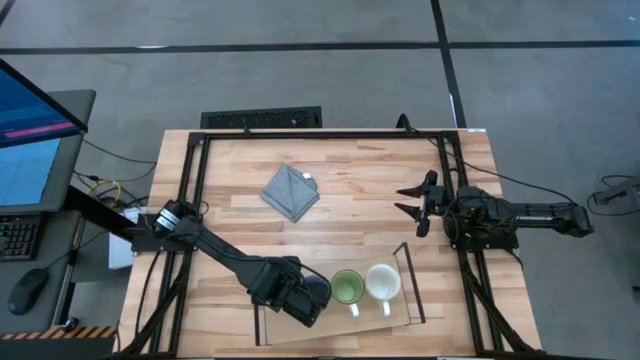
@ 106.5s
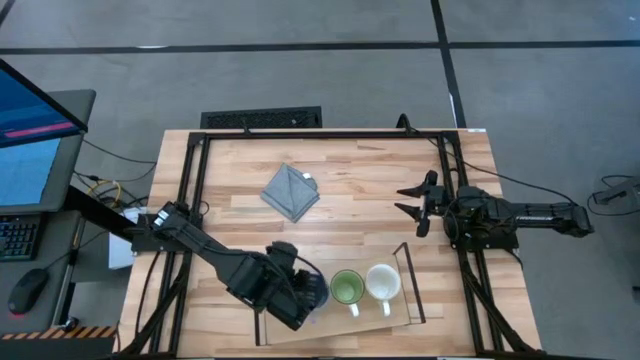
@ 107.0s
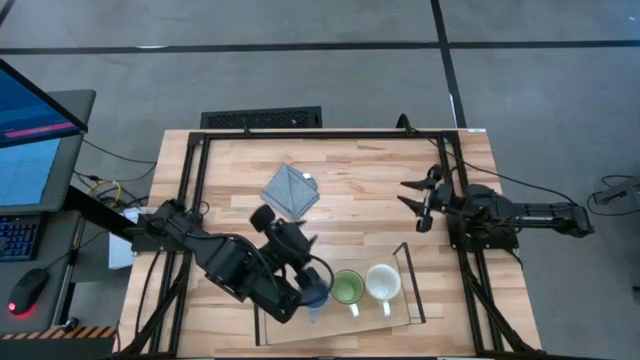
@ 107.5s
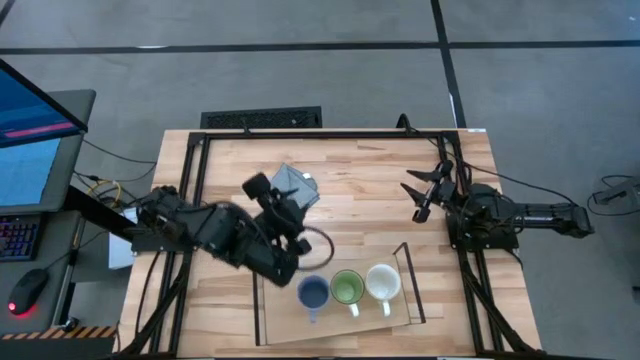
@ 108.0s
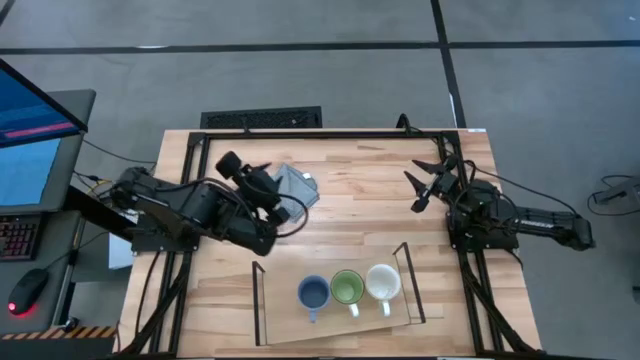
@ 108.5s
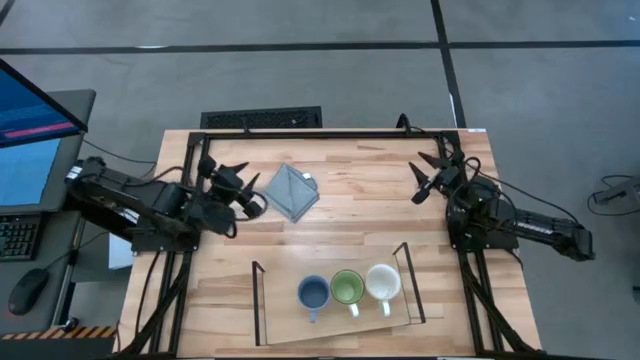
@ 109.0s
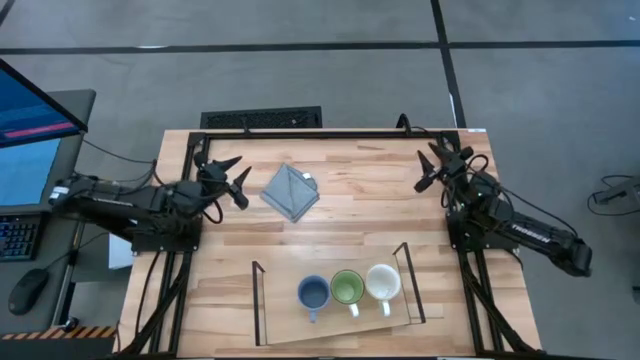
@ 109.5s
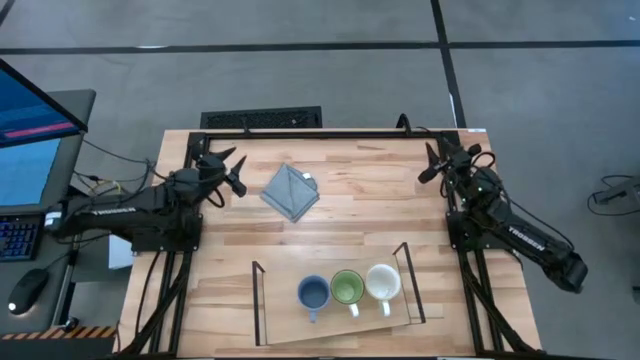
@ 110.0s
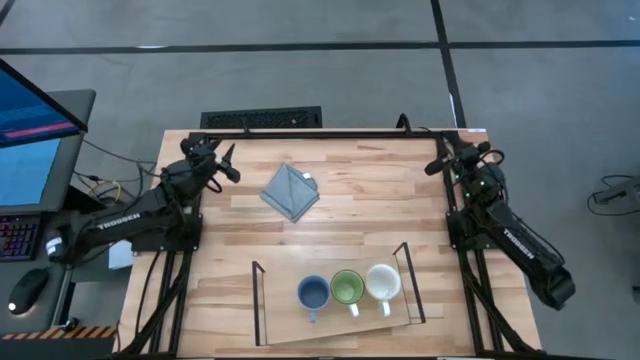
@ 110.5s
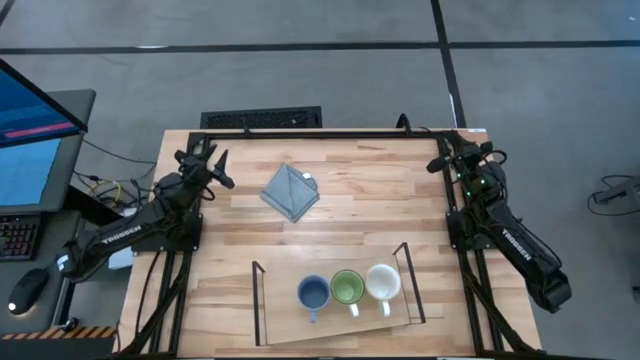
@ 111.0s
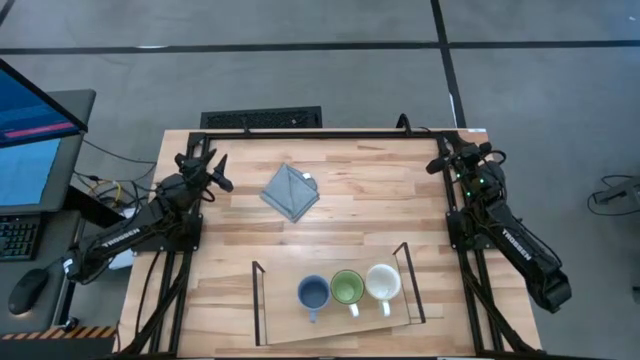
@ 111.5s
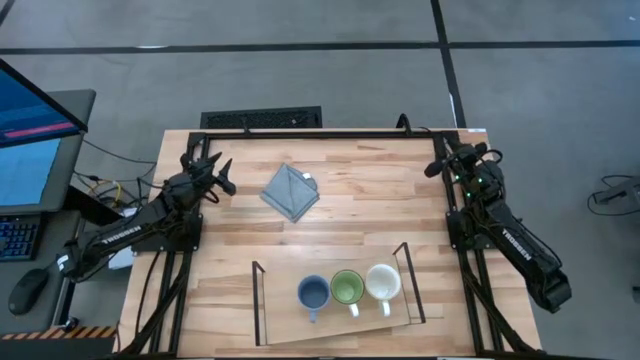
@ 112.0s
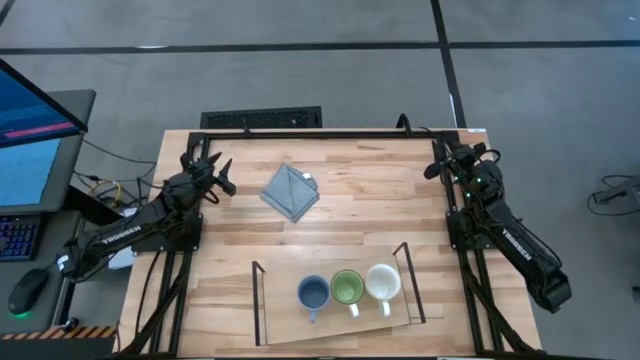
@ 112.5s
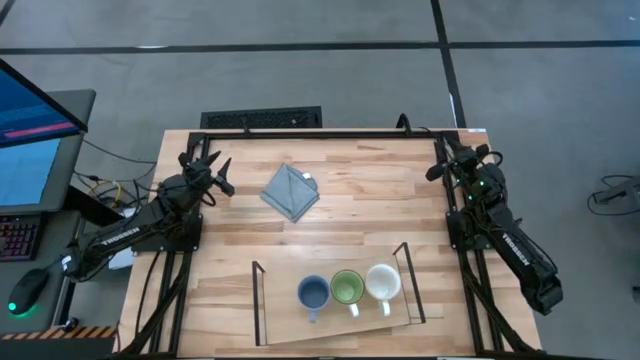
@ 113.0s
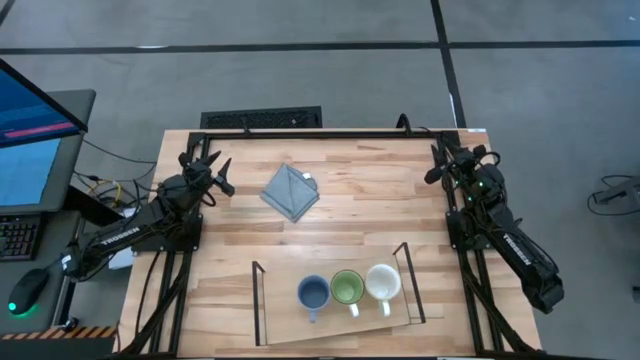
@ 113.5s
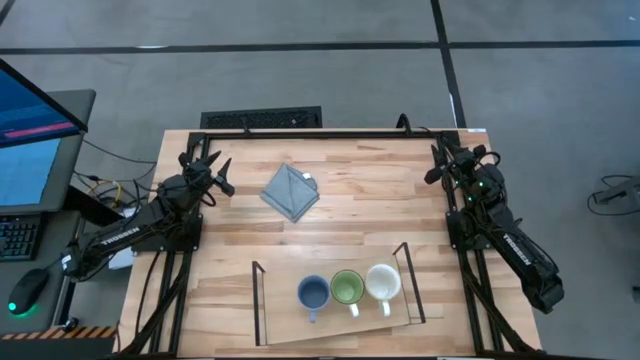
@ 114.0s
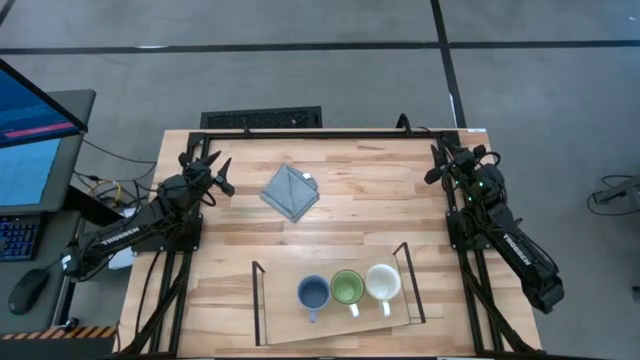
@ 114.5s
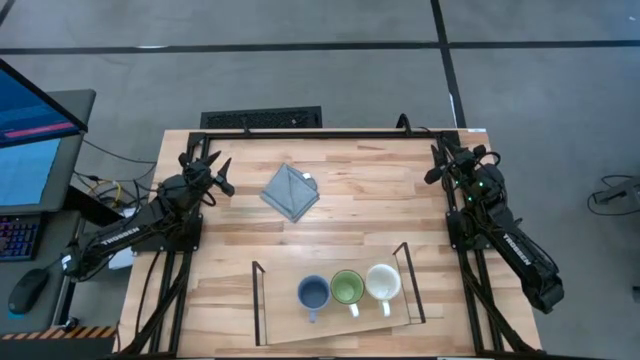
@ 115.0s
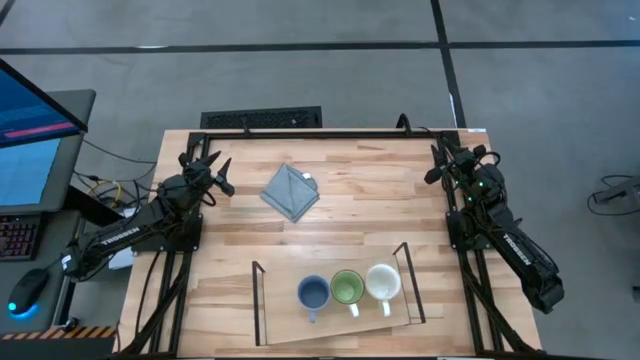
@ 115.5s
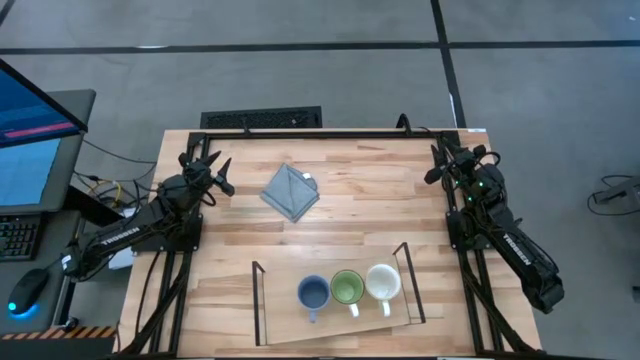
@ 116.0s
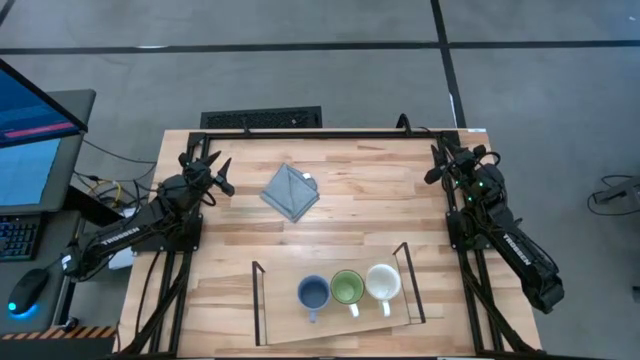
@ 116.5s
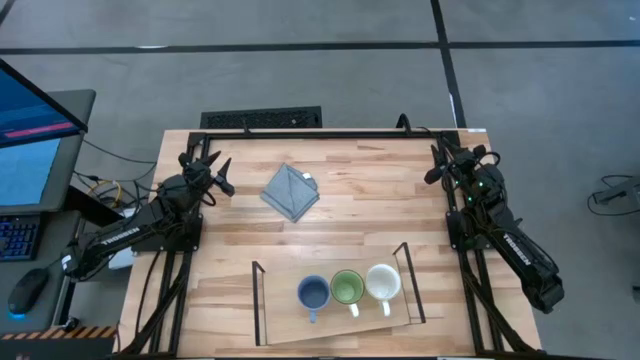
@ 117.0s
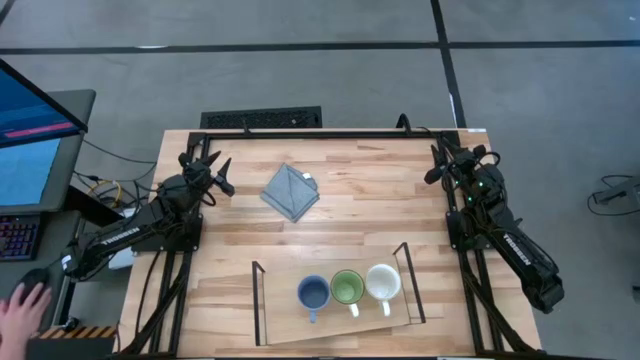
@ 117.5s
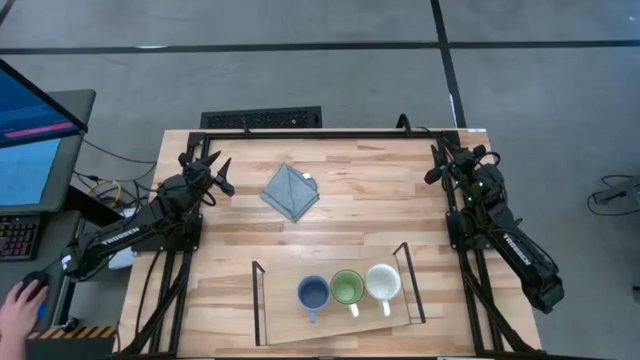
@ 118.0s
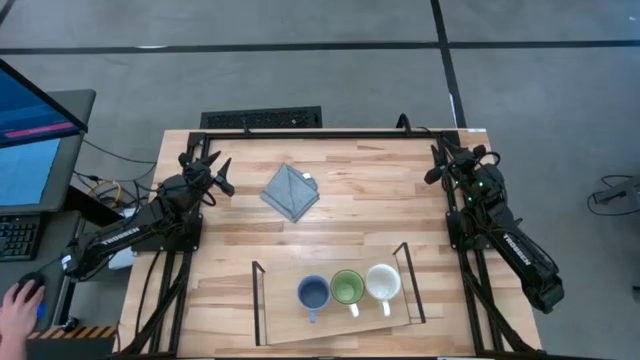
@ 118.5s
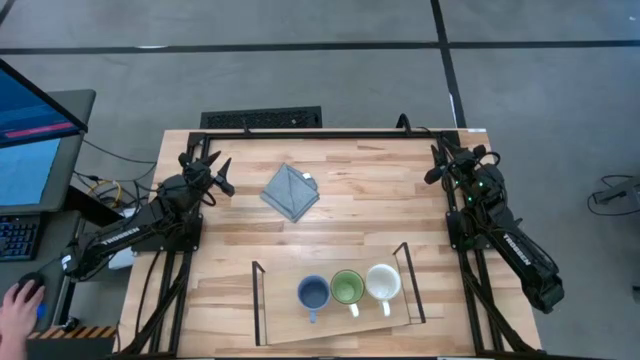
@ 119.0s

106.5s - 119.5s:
Task: Stack small to large cups/mugs on shelf
Return to Home Position

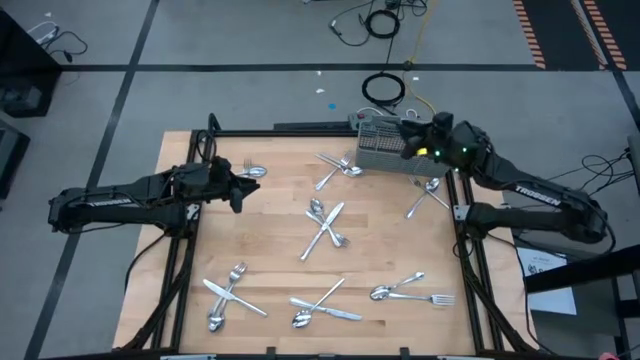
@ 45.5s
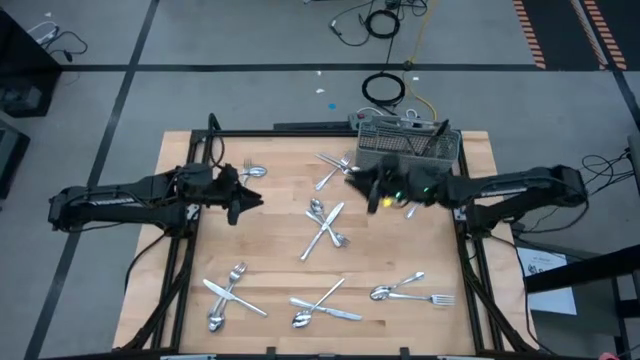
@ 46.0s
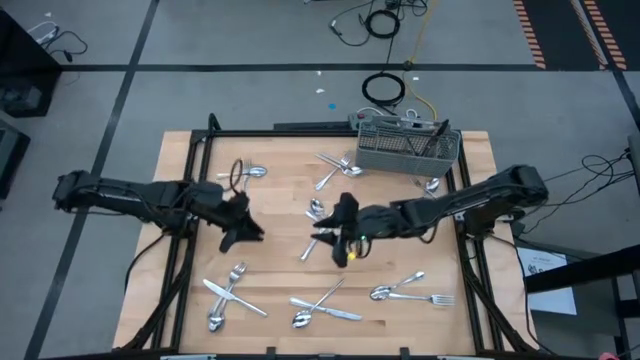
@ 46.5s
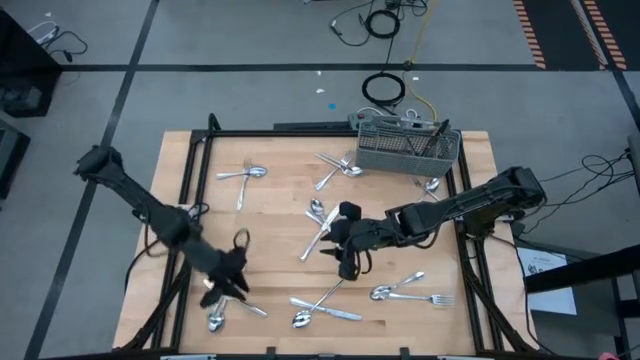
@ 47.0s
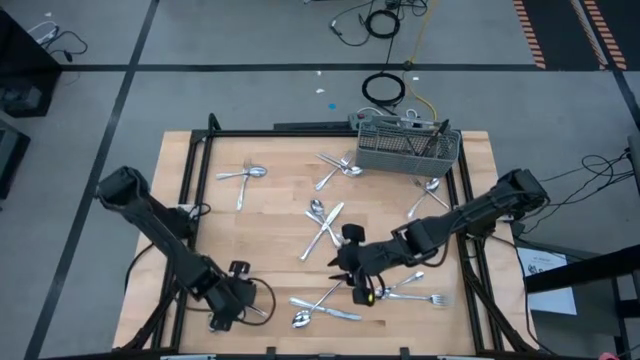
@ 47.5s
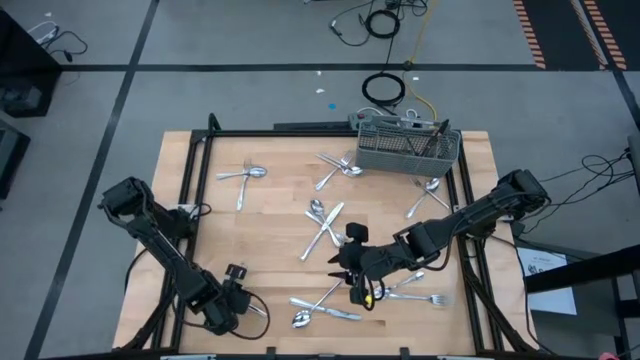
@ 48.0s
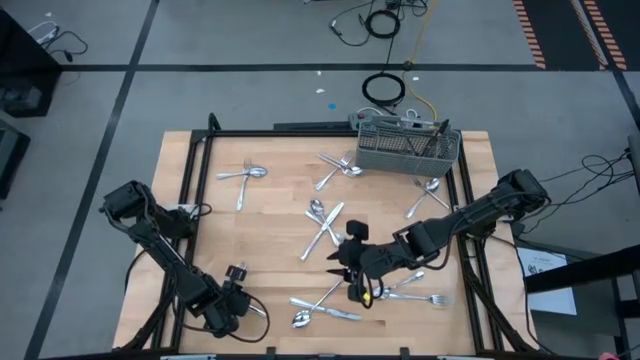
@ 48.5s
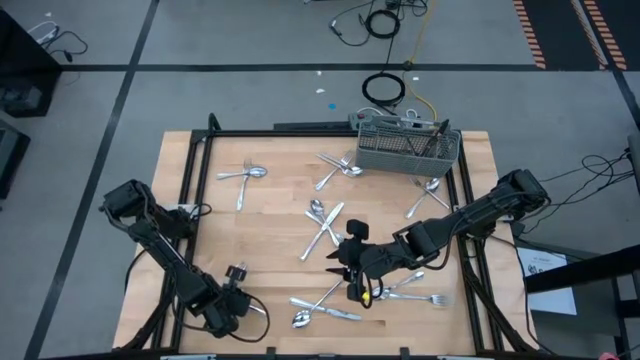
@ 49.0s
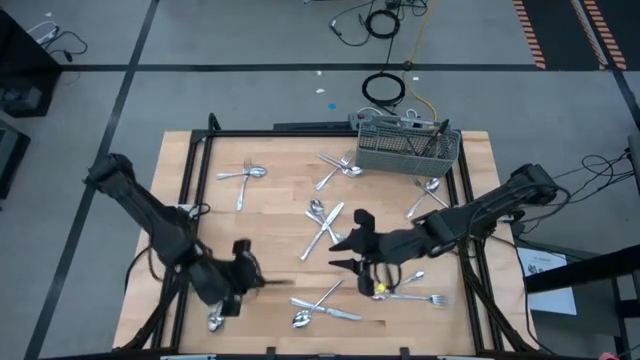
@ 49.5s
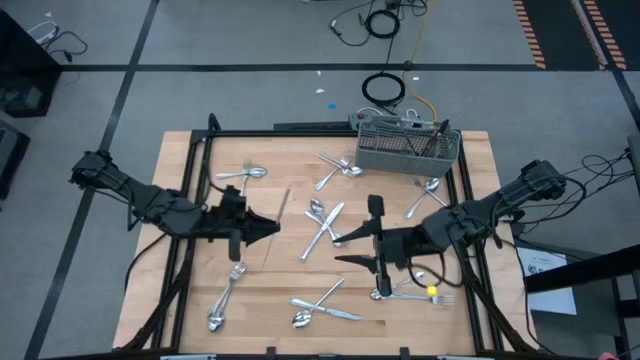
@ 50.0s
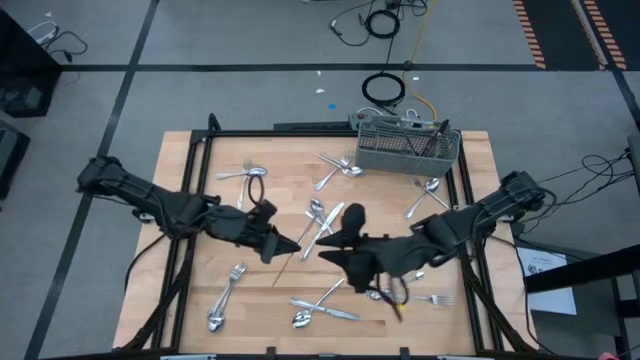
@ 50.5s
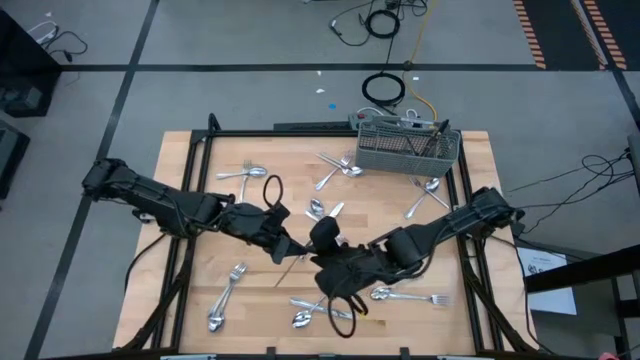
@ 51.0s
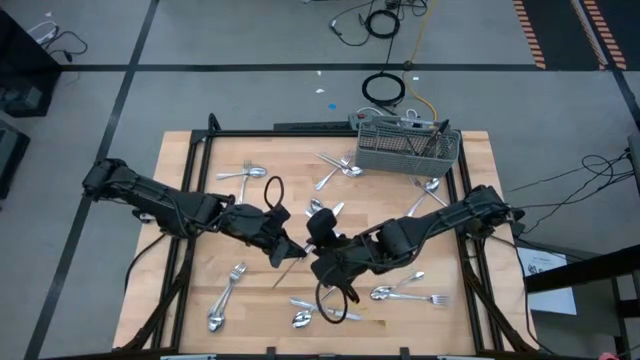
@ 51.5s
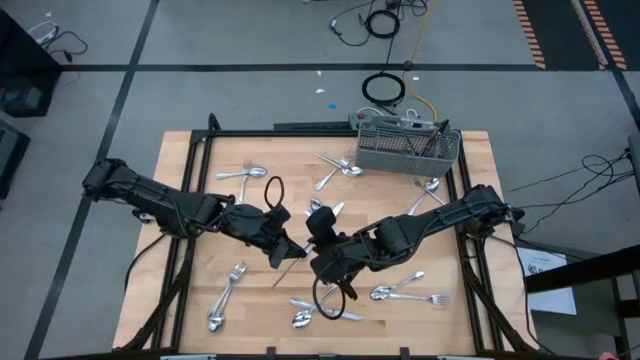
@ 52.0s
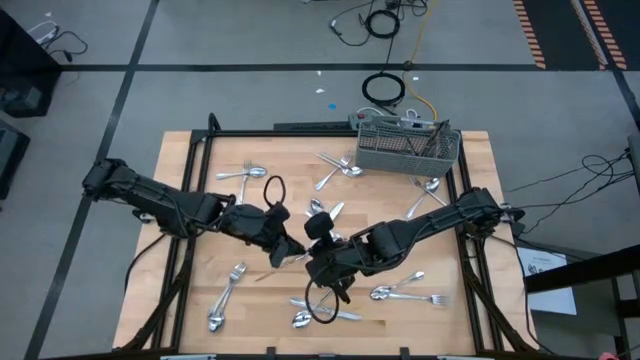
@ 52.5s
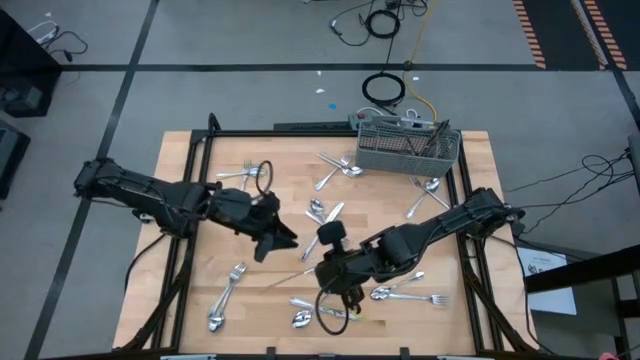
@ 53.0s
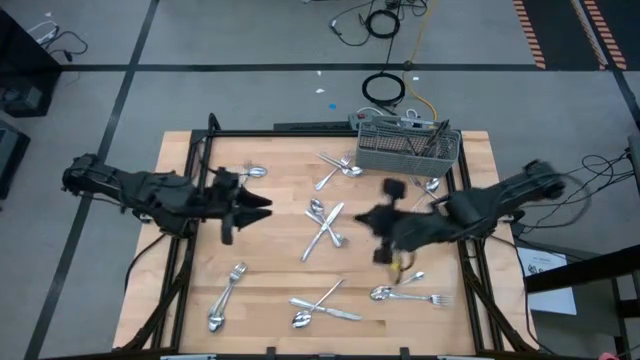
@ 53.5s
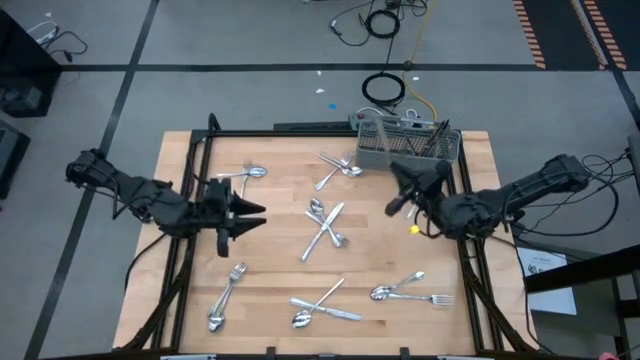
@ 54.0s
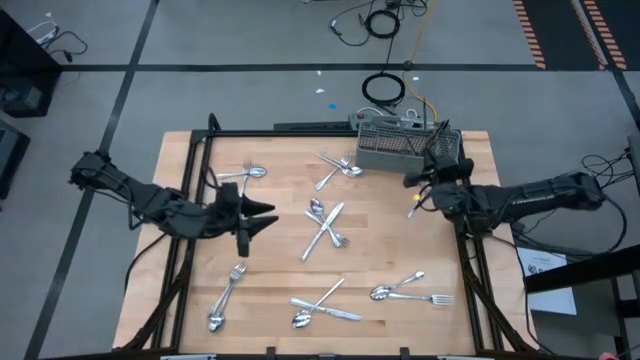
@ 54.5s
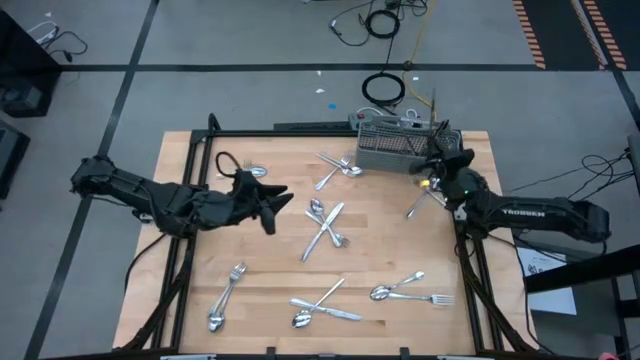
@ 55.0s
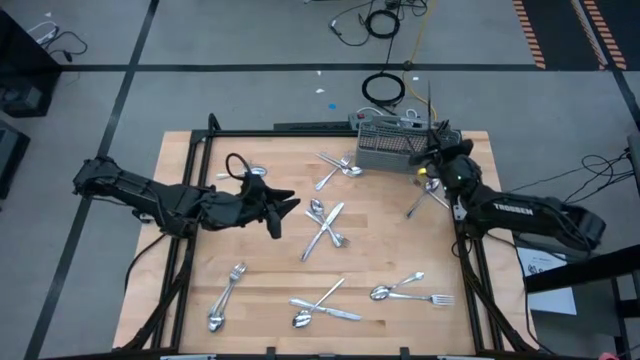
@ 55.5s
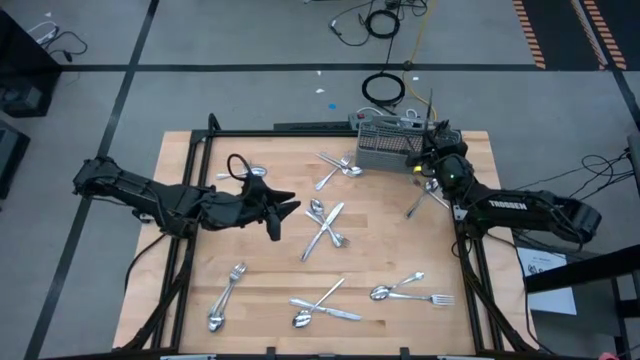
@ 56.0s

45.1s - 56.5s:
Task: Sort silverware
Put the silver table knife into the gray utensil holder
